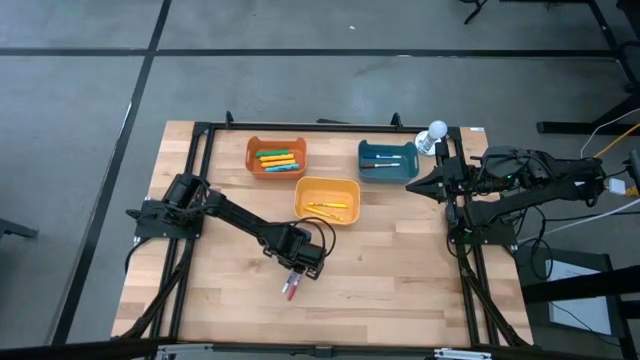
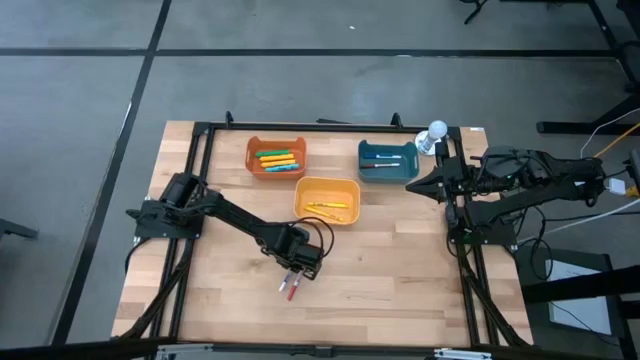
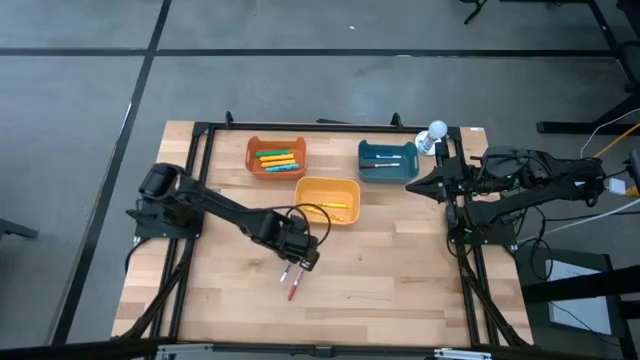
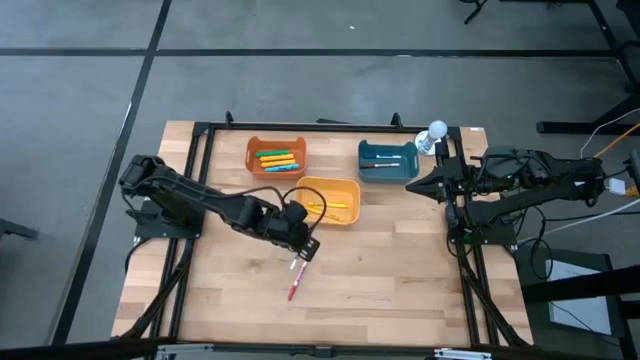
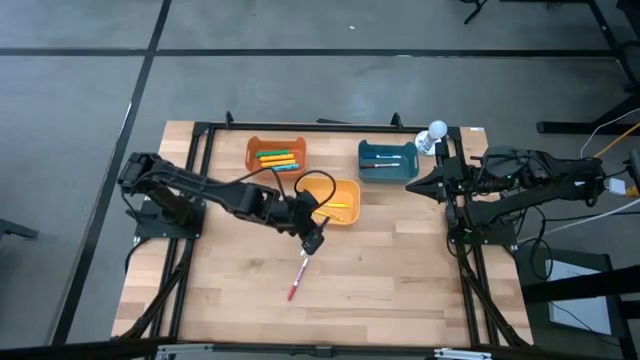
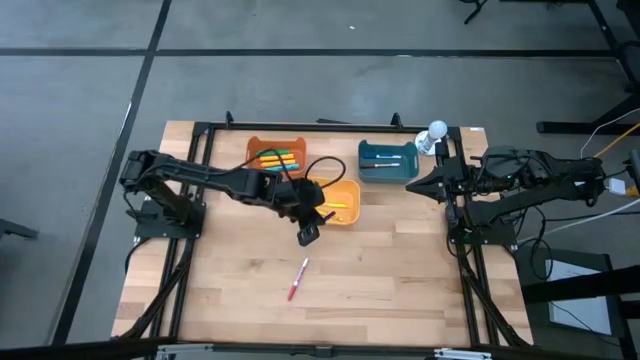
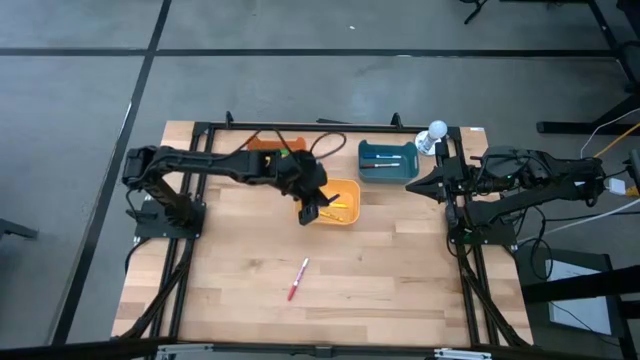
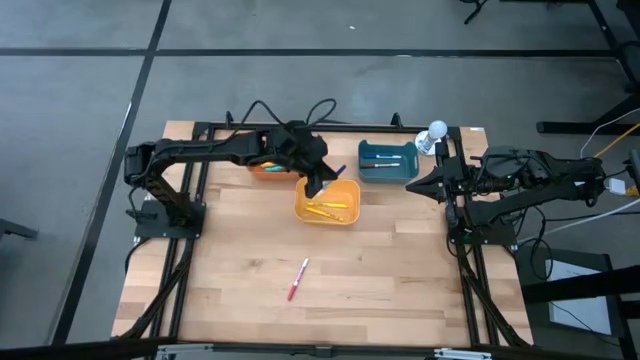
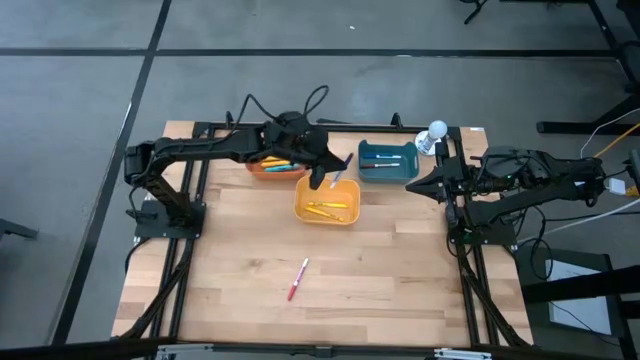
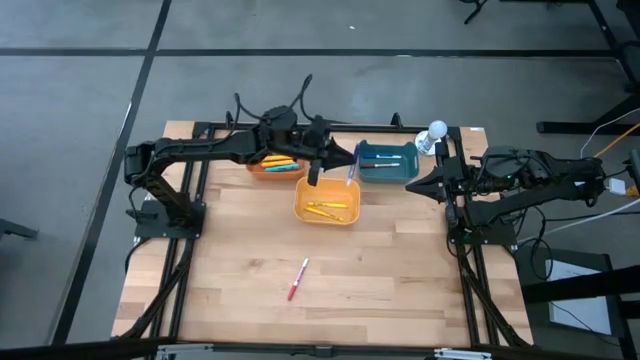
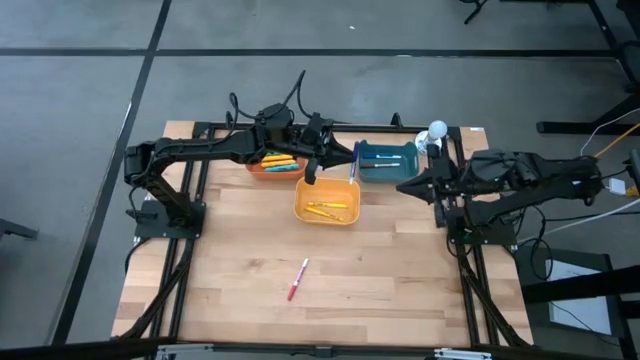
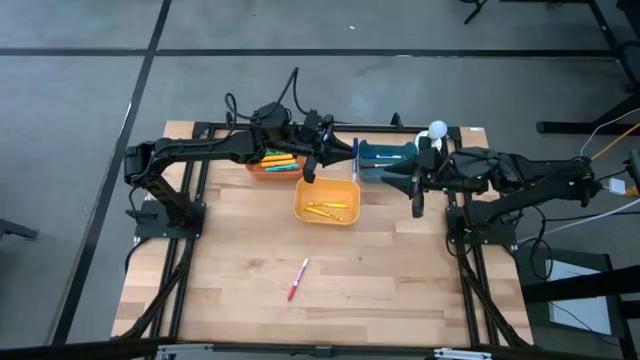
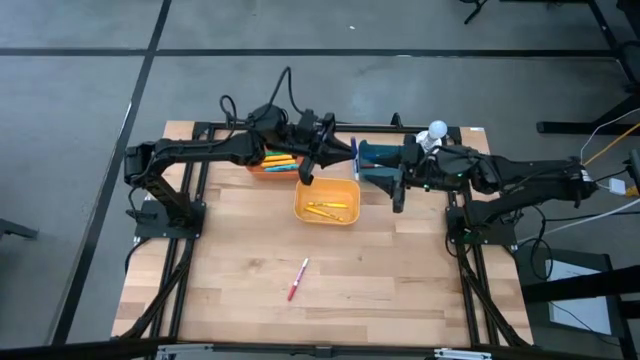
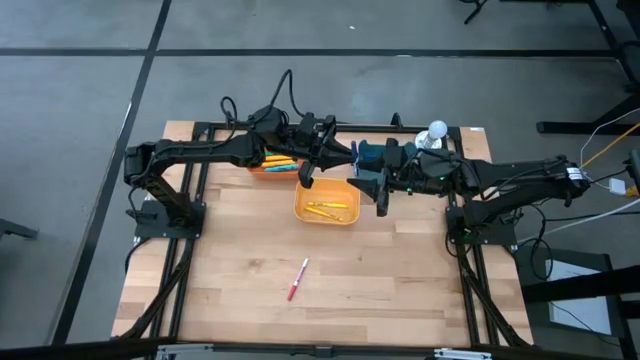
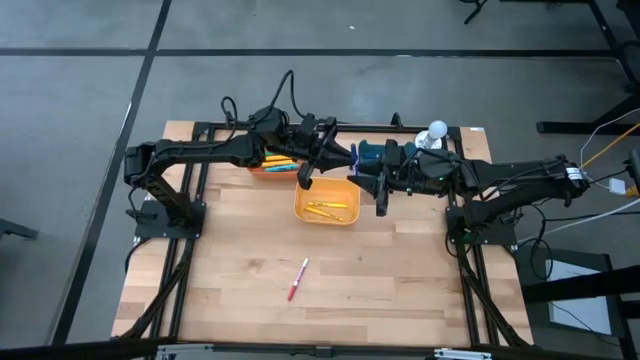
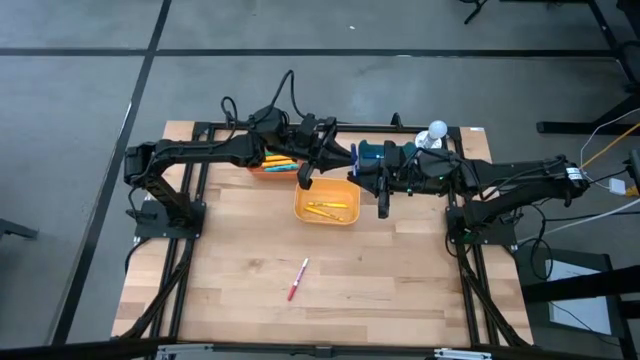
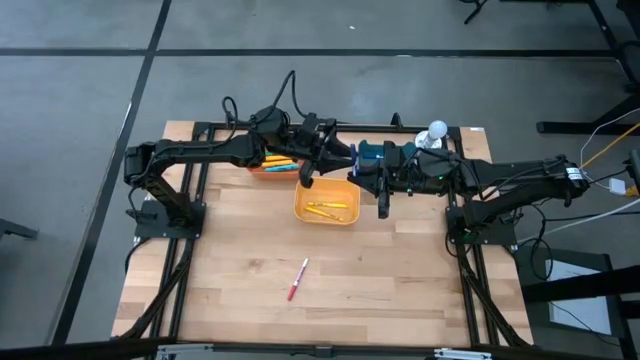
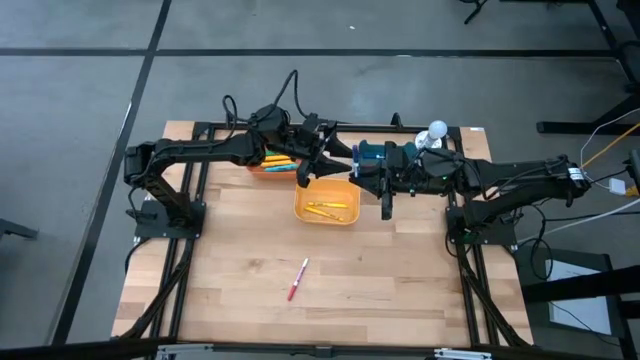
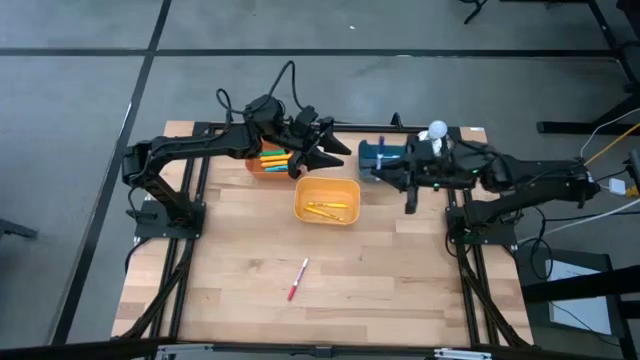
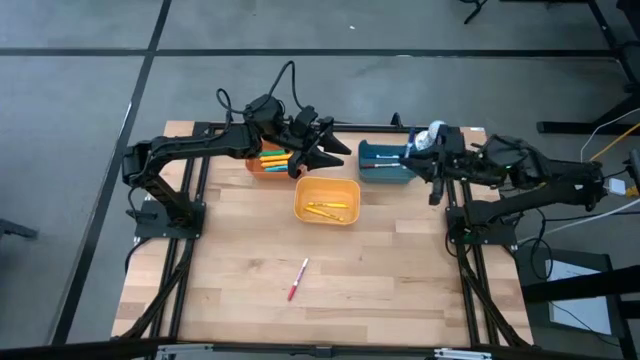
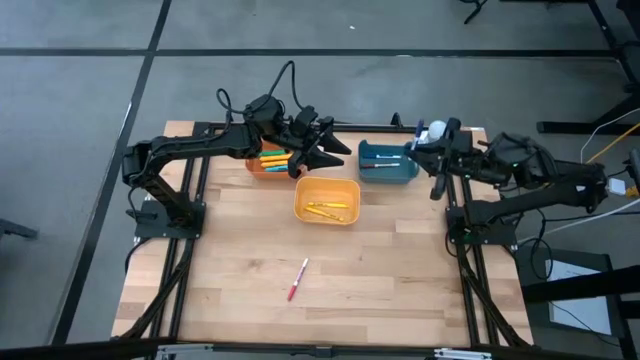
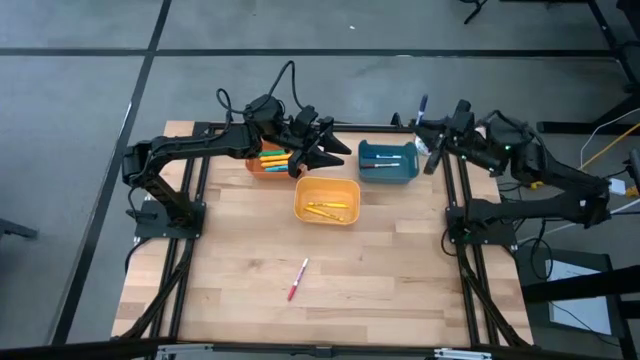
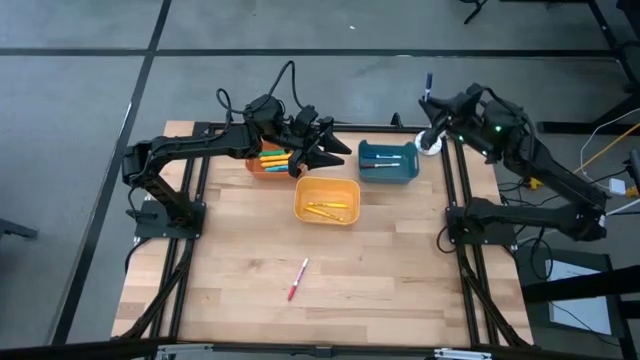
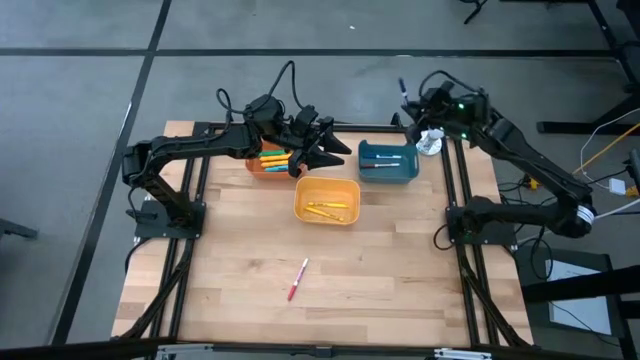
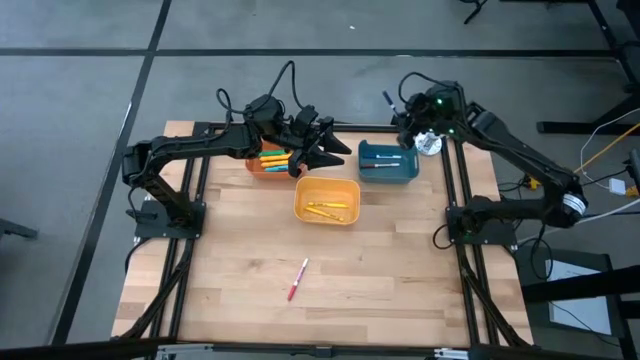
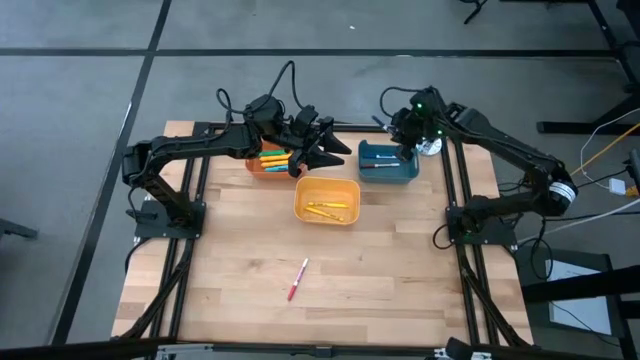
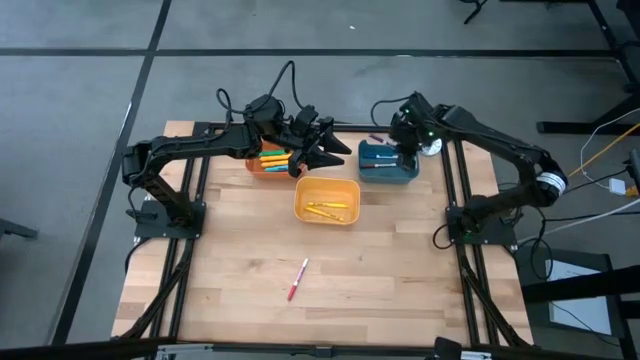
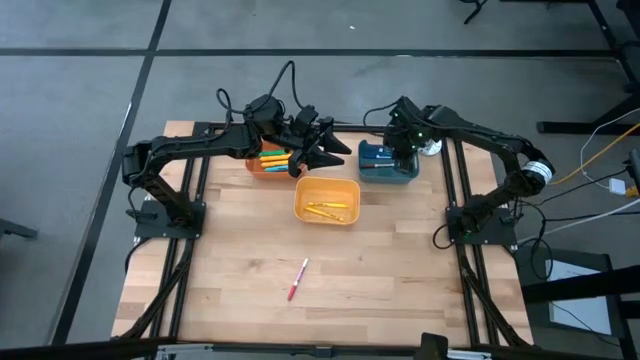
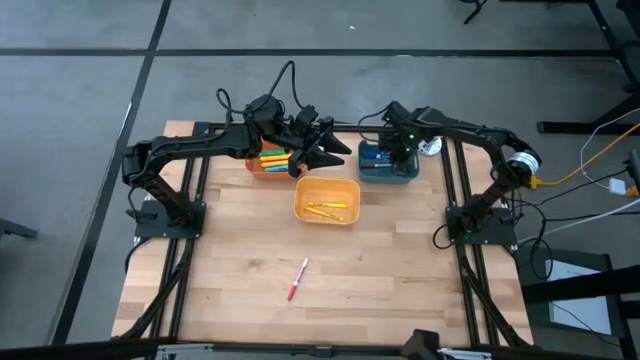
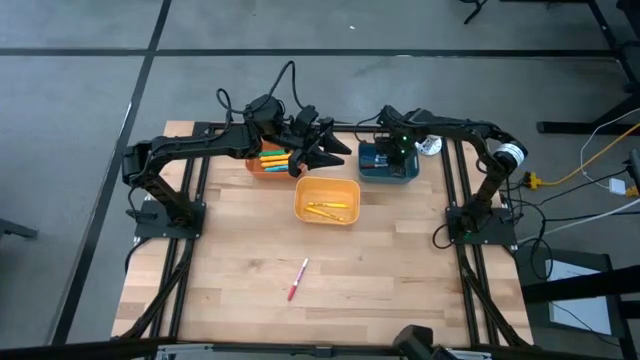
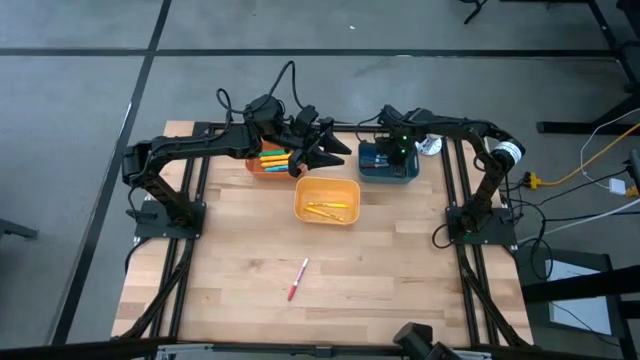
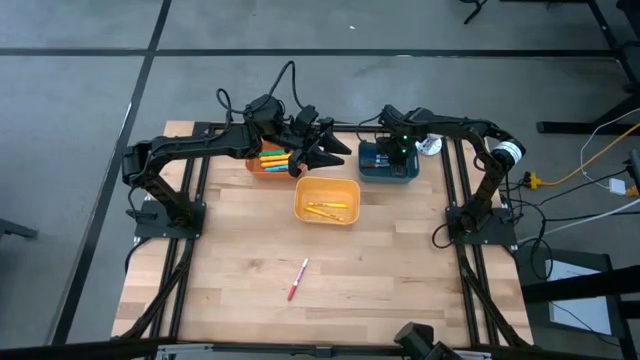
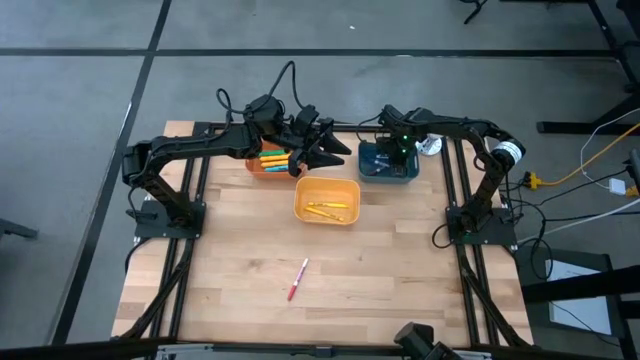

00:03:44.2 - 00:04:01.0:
Task: Pick & Place Markers
Put the blue marker pen into the blue bin

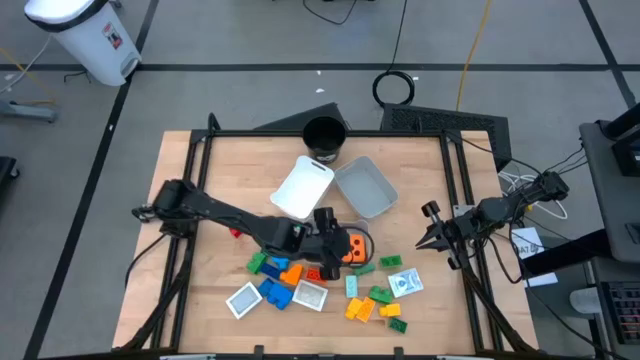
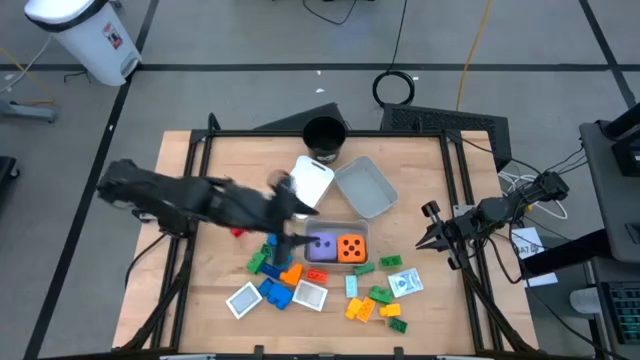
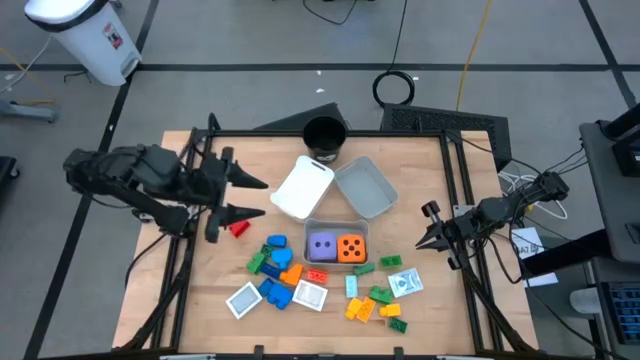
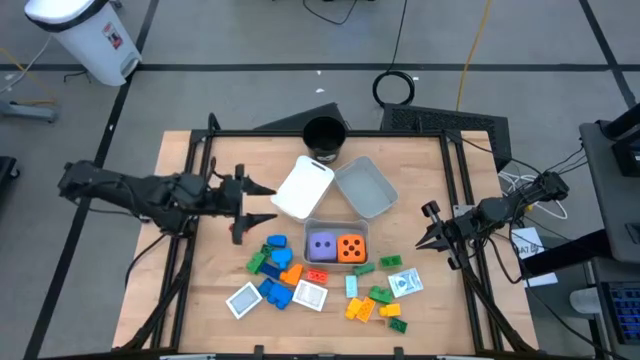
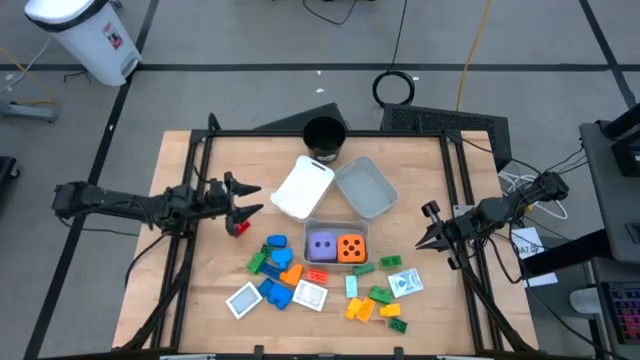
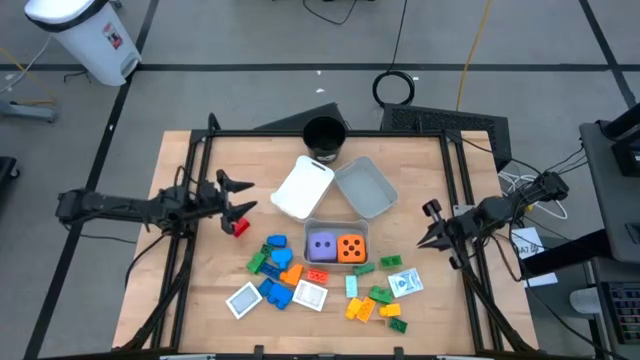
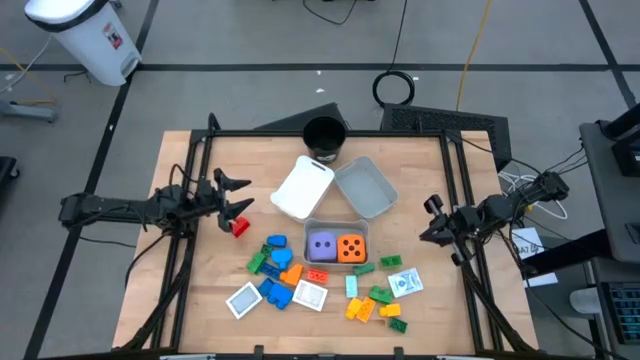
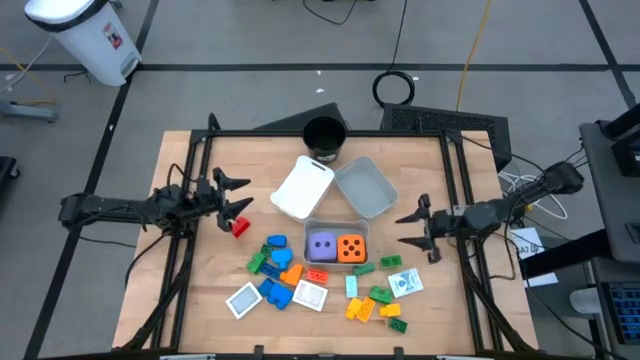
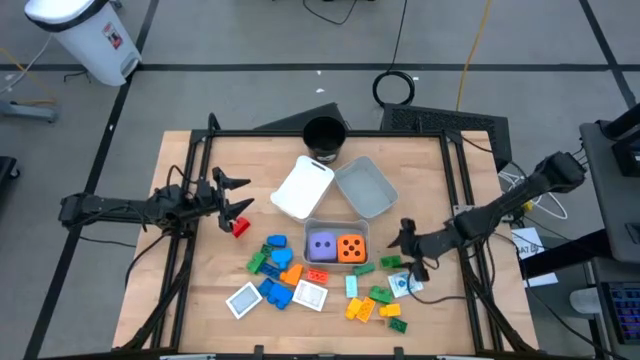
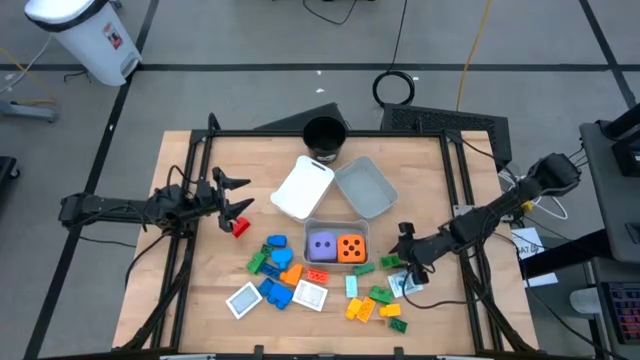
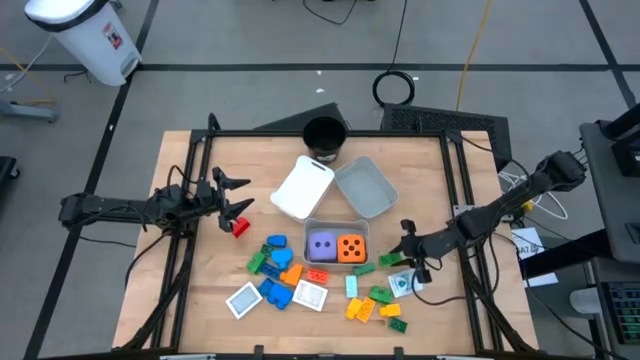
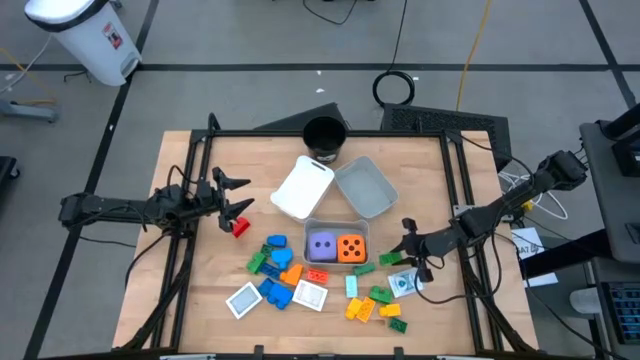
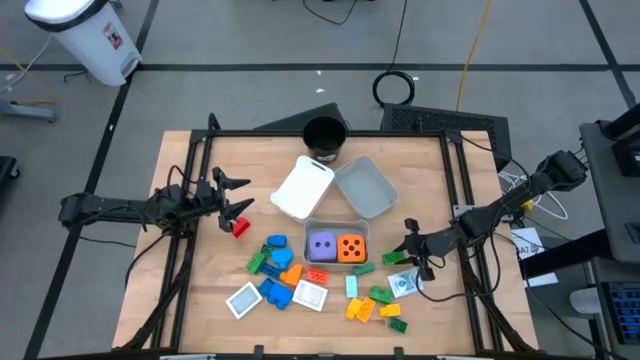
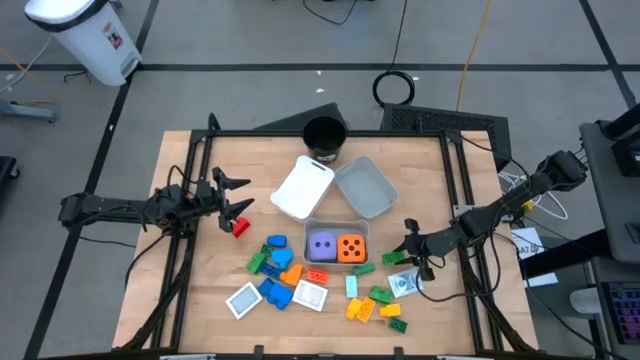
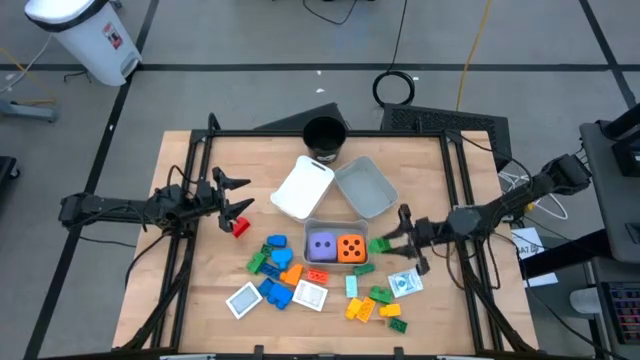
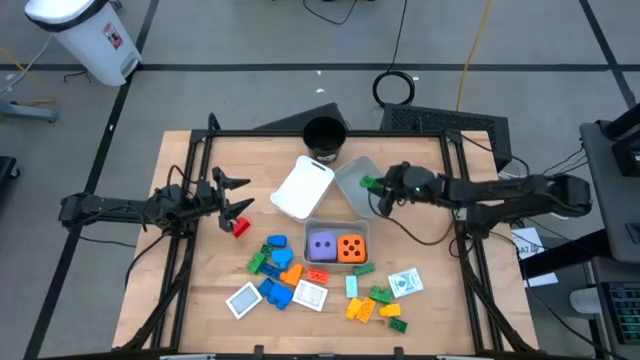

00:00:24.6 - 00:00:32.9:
Task: Pick & Place Toys
Put the green game piece into the top gray bin
